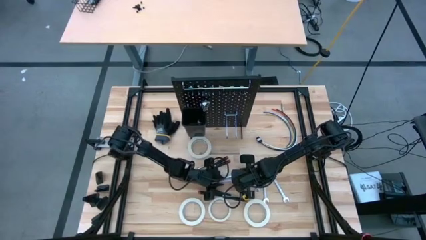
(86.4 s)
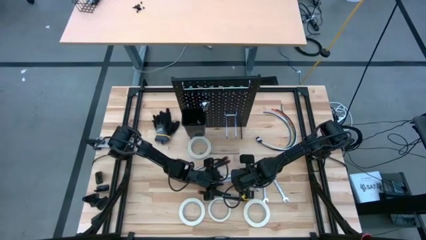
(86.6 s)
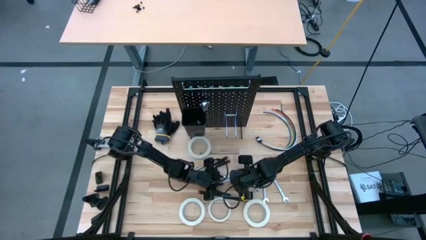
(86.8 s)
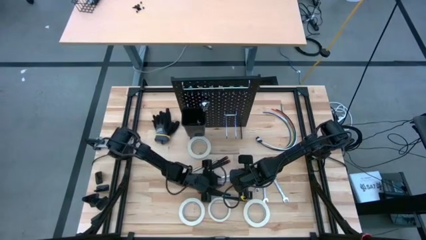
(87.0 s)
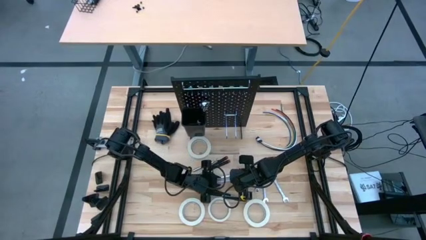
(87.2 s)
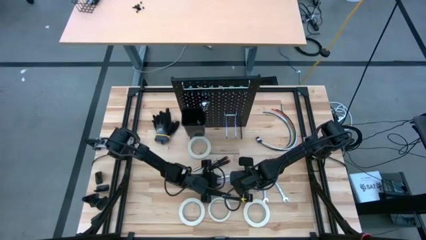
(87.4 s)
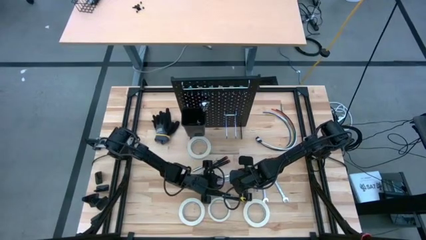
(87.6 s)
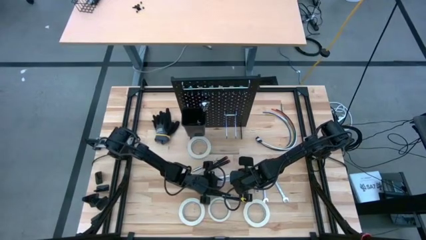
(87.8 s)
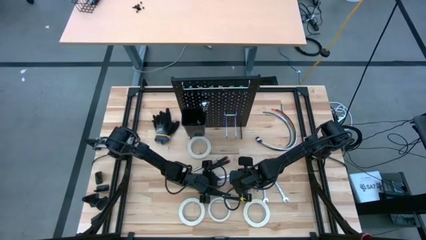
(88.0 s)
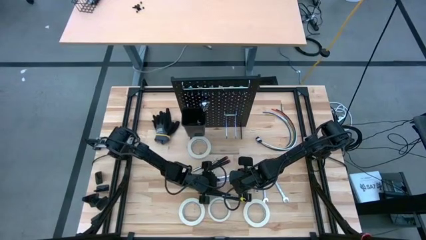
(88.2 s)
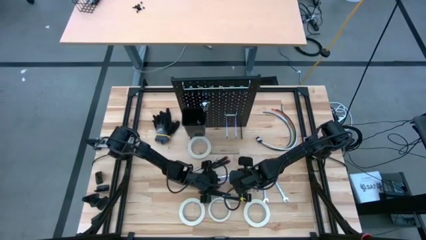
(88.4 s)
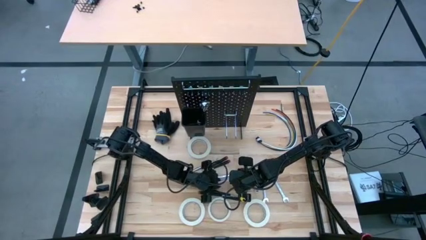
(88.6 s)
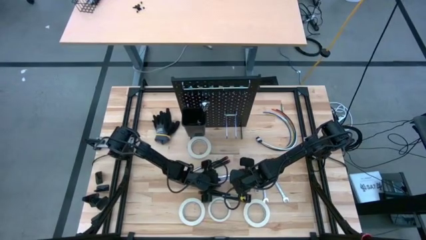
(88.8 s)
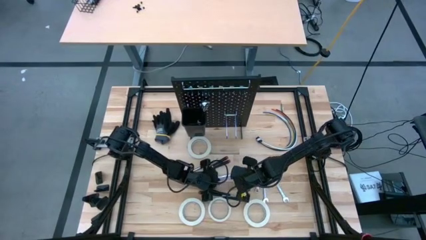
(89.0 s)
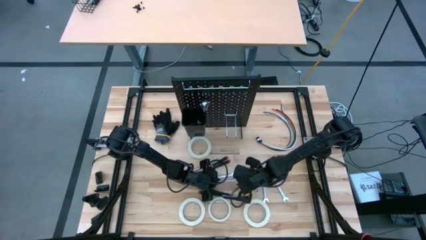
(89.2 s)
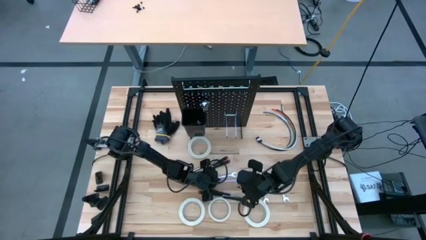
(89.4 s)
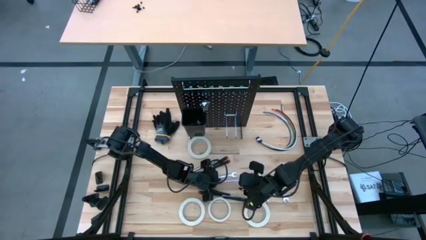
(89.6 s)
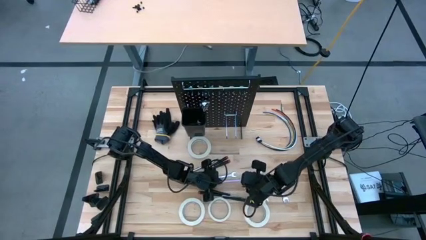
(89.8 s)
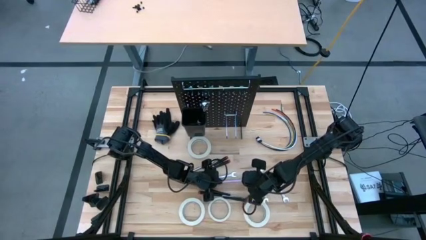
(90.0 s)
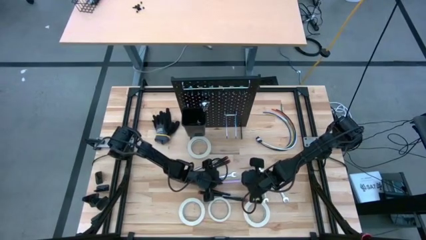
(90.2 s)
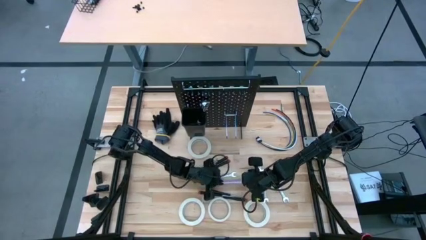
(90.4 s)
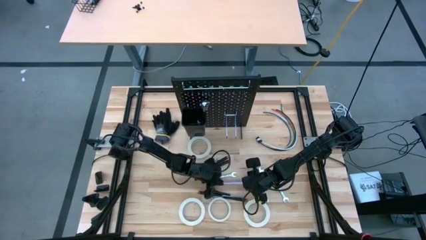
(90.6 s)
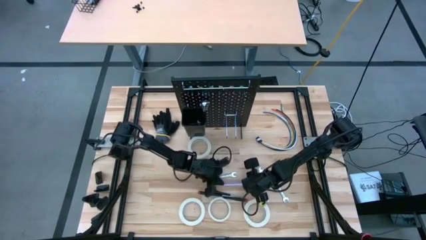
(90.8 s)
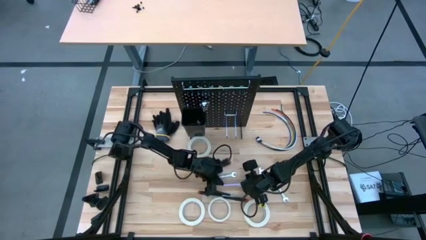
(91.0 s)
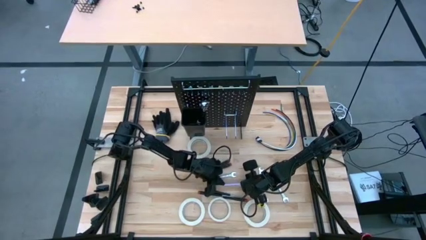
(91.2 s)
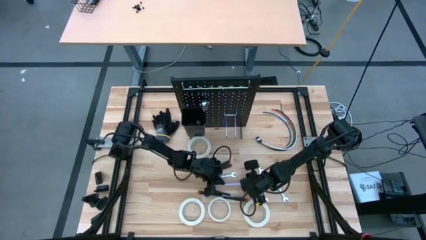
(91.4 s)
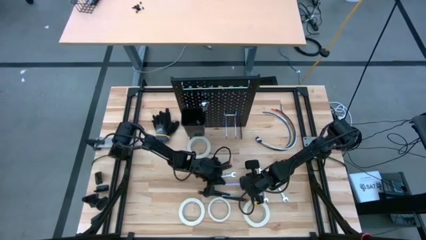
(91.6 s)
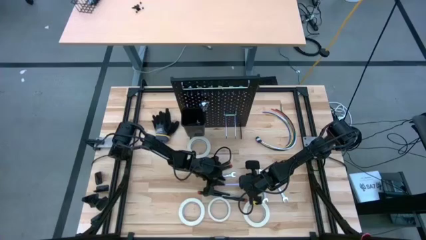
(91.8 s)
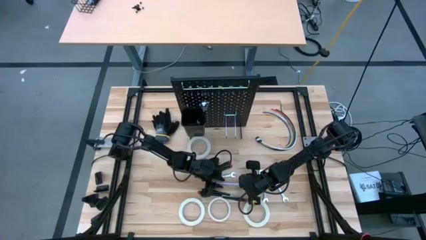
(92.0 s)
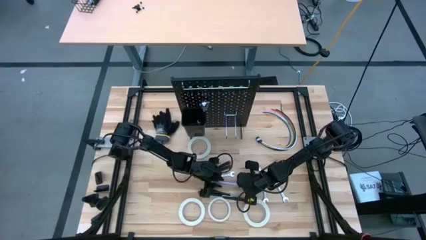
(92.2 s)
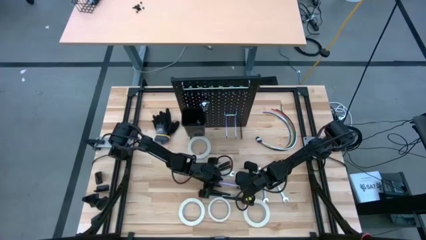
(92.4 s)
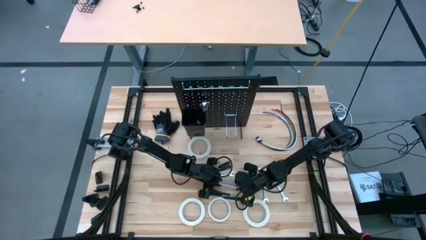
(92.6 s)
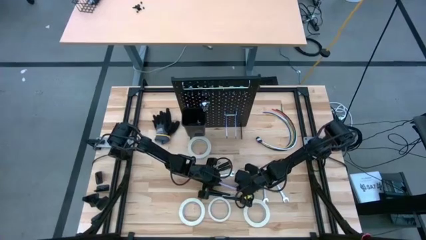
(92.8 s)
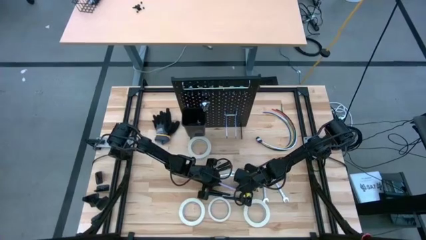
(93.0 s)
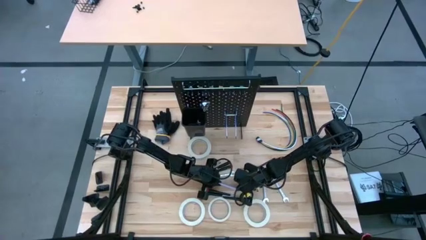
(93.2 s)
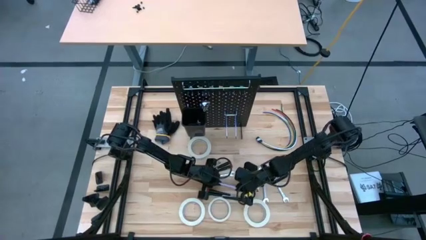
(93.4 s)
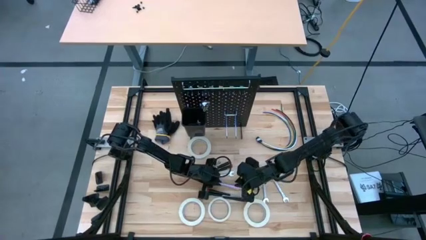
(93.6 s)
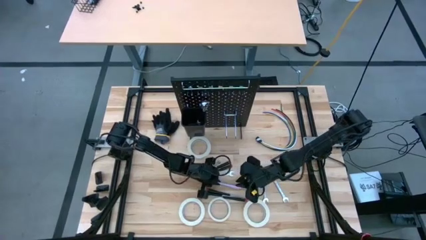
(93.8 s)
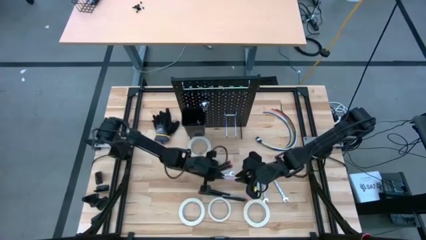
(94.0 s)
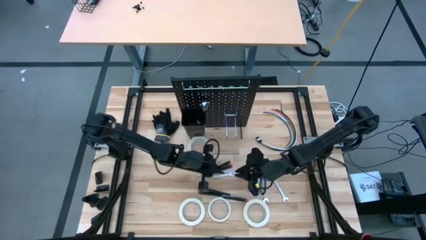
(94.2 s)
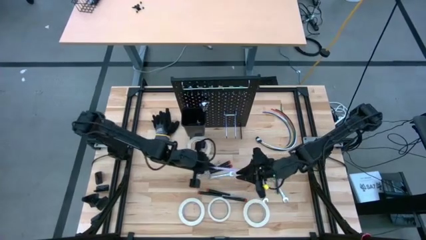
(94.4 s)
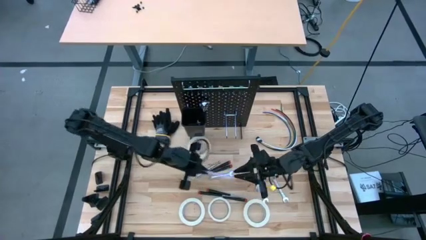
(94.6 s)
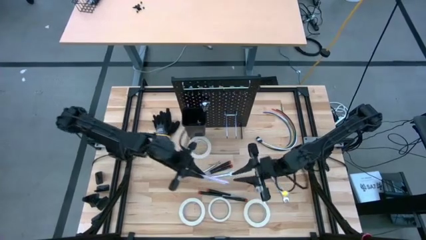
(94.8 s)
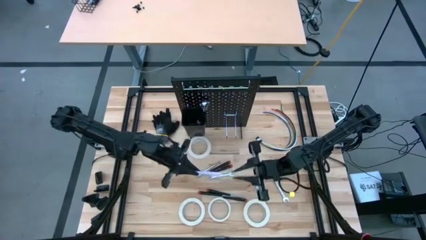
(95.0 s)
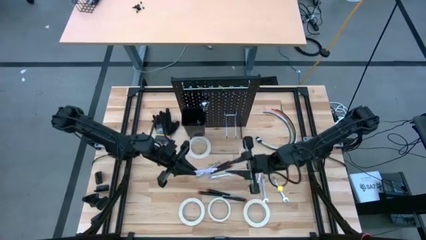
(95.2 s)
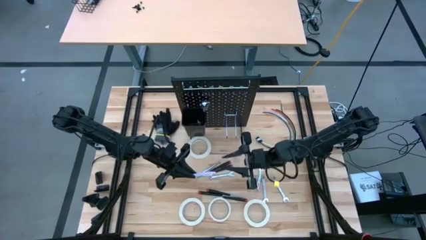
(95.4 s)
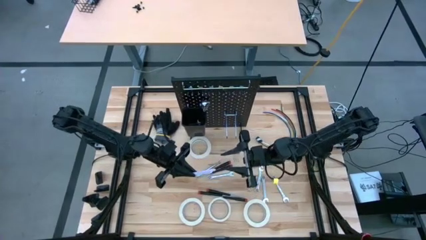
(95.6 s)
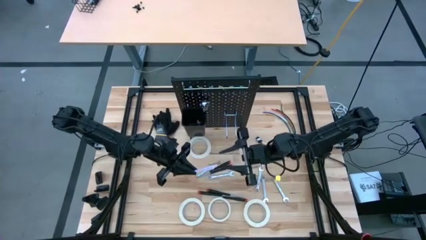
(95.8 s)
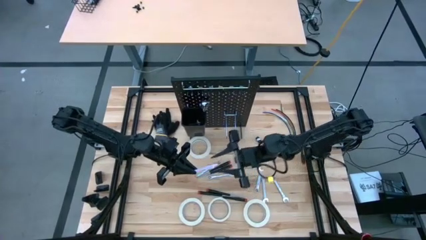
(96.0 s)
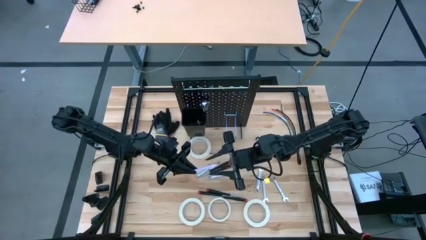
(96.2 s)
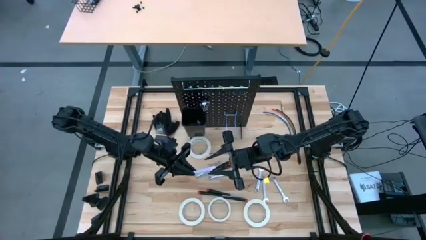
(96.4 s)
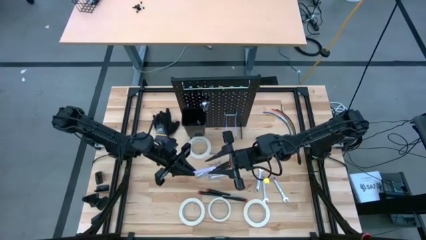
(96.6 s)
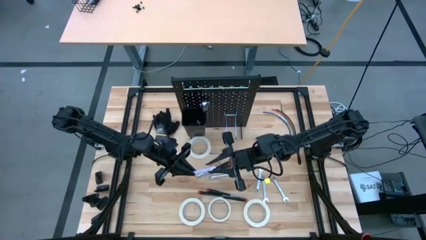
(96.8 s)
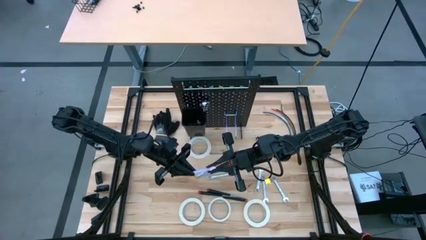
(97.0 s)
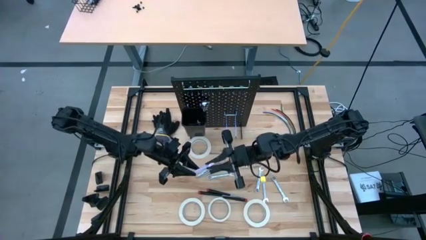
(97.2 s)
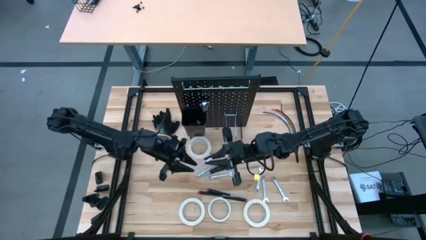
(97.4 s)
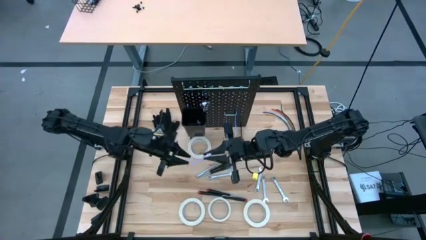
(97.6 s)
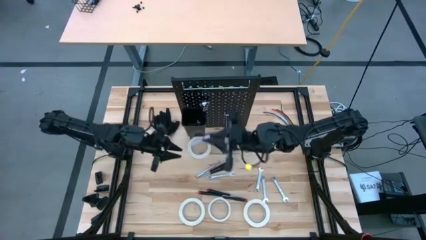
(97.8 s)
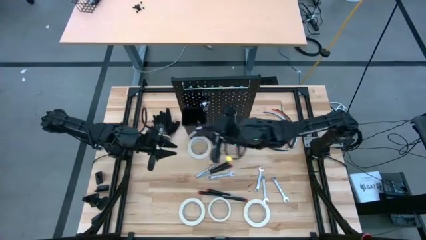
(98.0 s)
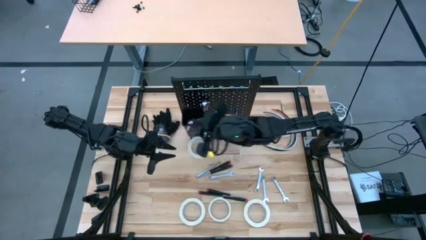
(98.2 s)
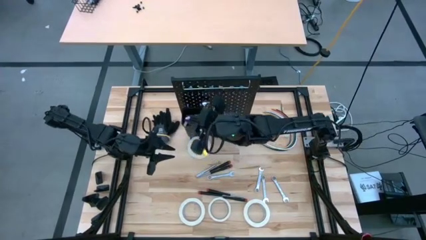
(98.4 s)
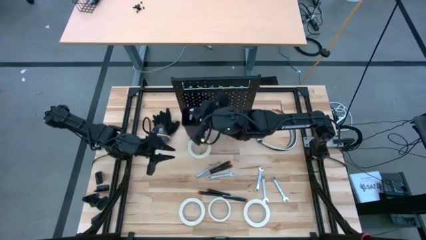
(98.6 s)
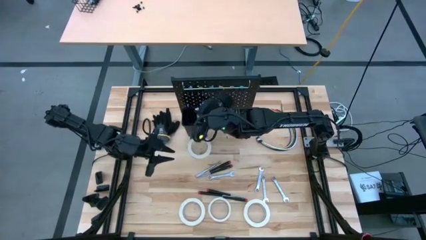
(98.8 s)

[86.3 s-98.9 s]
Task: Hang tools onto peg board
Put the purple pen into the black bin on the peg board

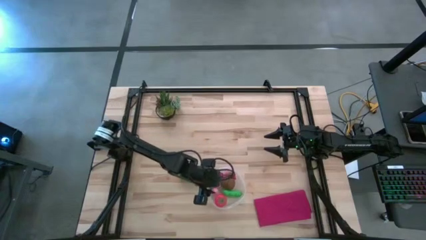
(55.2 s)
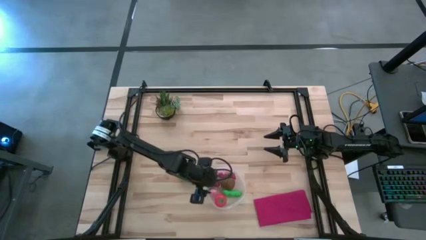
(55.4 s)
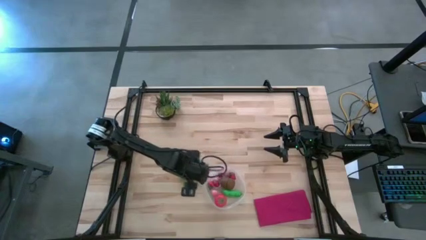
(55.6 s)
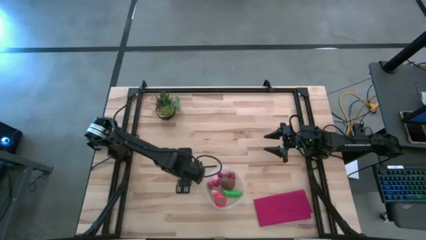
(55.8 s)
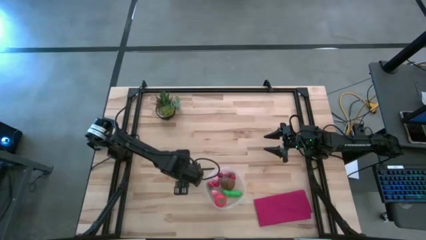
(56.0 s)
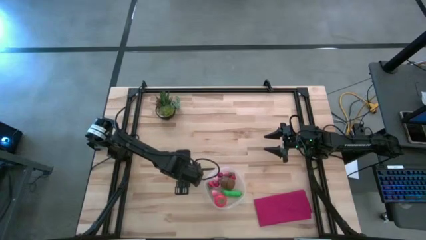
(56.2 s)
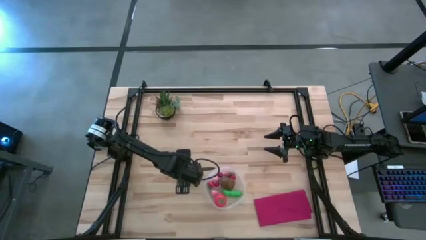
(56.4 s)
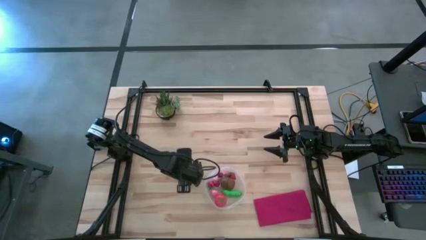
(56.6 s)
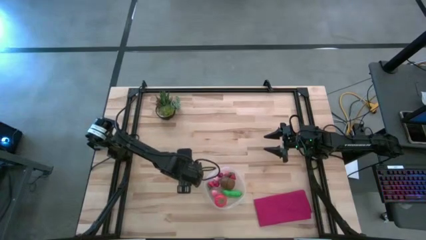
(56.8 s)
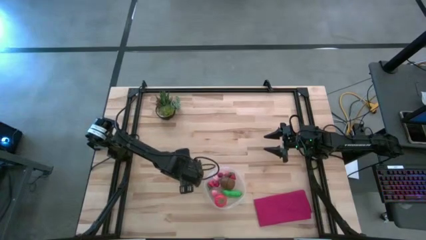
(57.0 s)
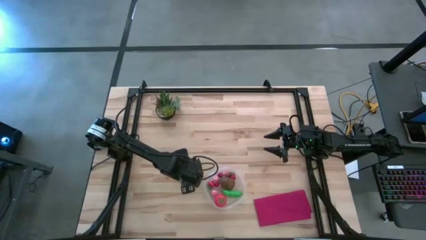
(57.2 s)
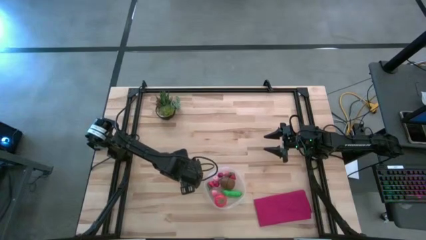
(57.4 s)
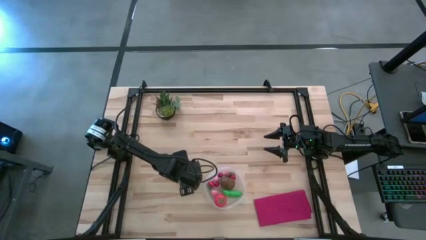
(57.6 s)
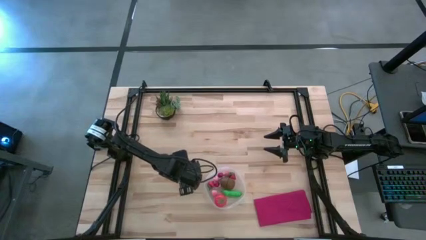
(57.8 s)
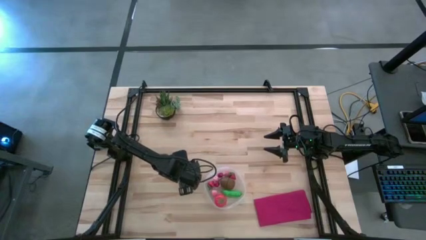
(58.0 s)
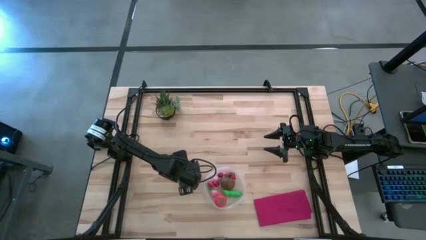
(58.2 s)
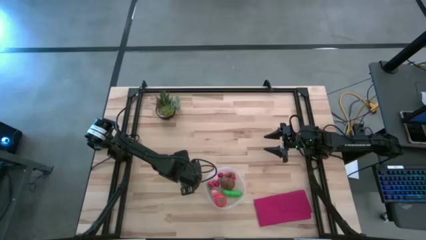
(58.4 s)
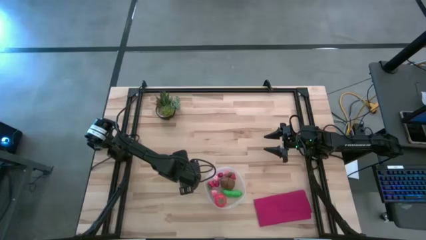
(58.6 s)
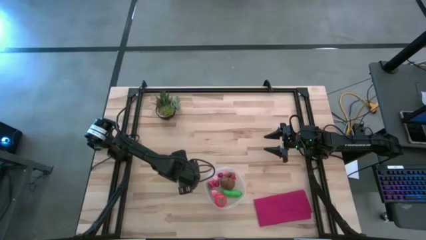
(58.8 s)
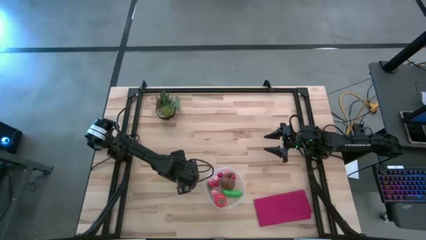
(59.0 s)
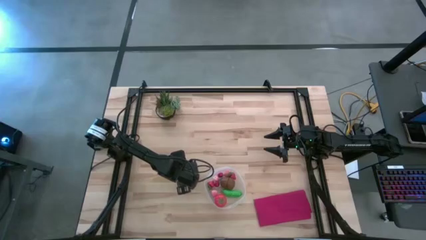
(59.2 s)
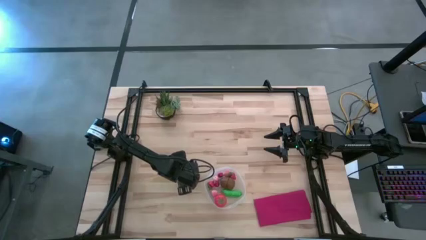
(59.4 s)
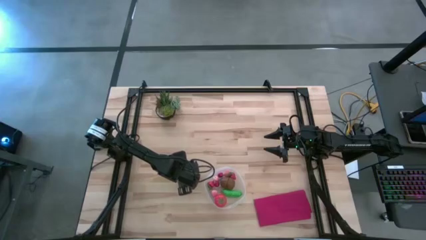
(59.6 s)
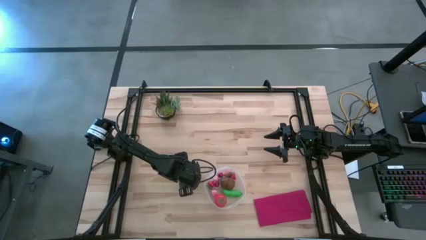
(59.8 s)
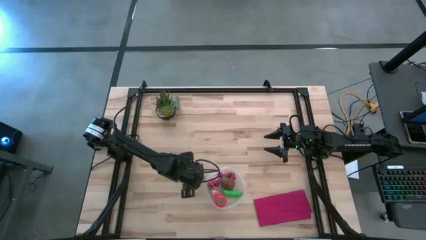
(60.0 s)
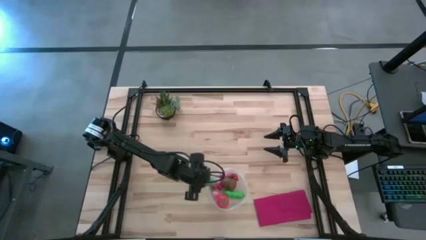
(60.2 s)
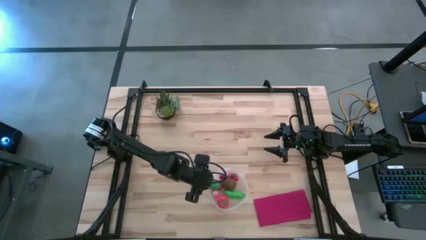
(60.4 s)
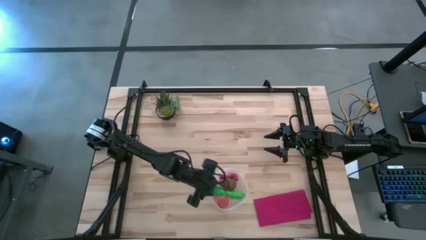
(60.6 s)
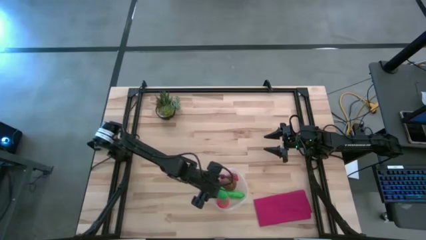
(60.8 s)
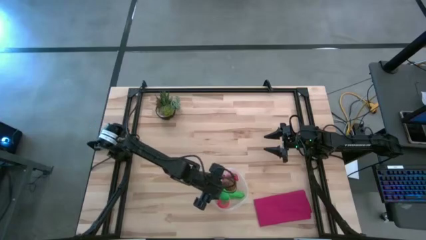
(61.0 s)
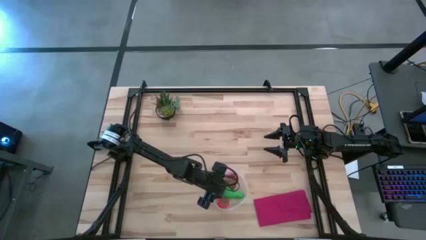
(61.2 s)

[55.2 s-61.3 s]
Task: Pick and placing Produce into tupperware
Put the yellow corn into the transparent bin
